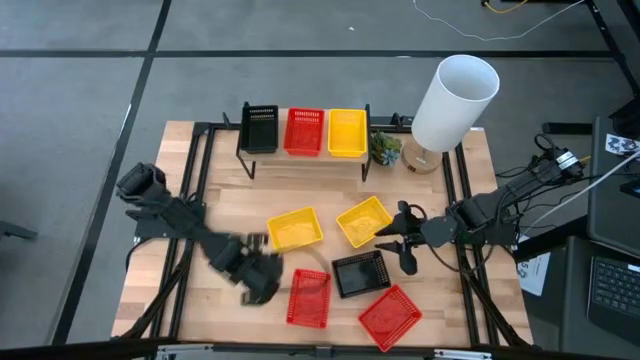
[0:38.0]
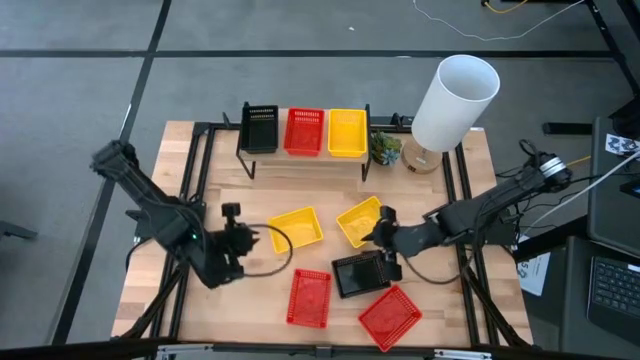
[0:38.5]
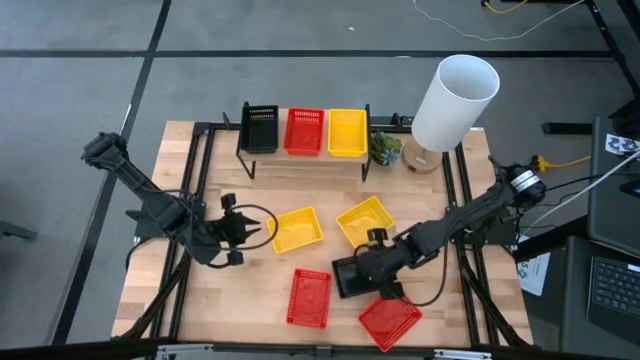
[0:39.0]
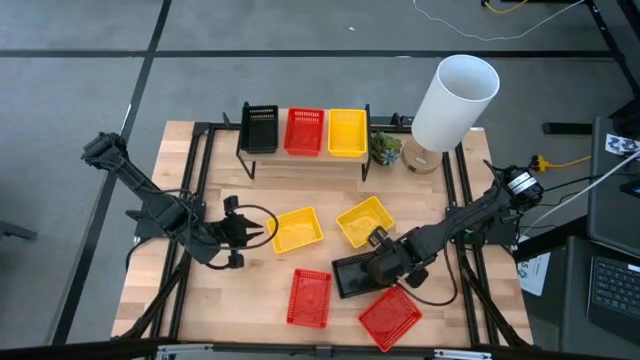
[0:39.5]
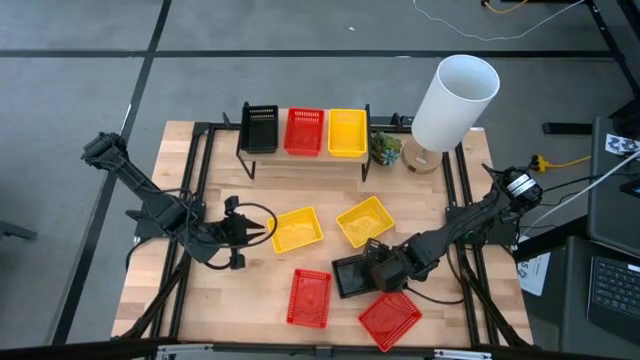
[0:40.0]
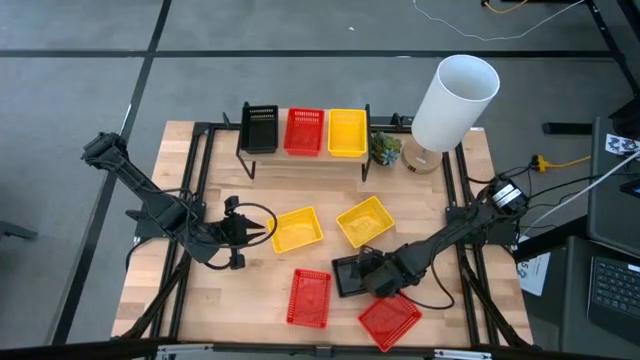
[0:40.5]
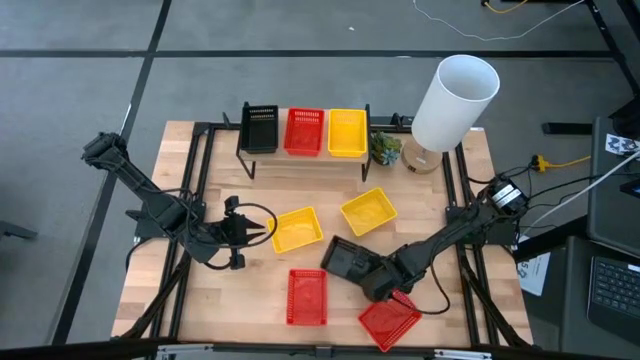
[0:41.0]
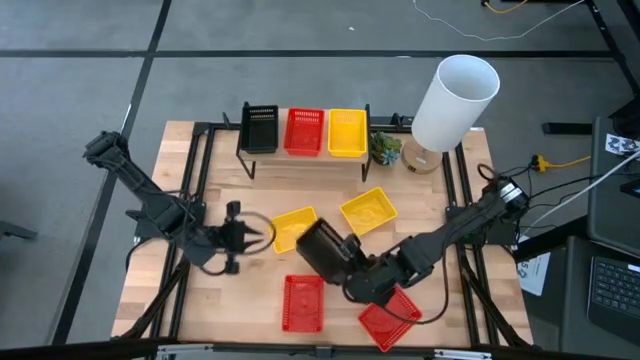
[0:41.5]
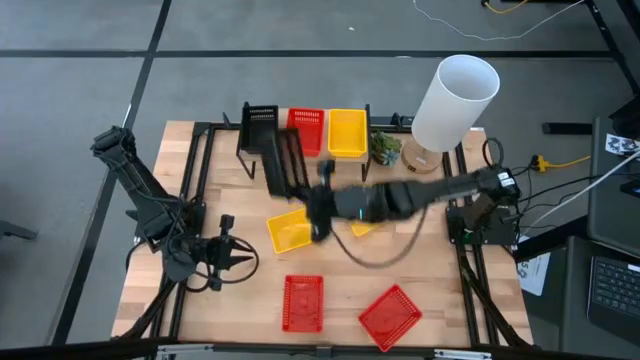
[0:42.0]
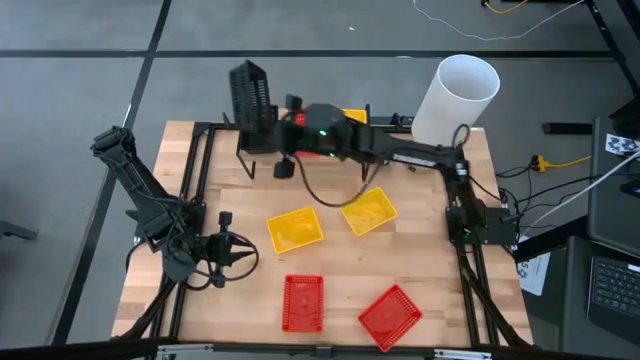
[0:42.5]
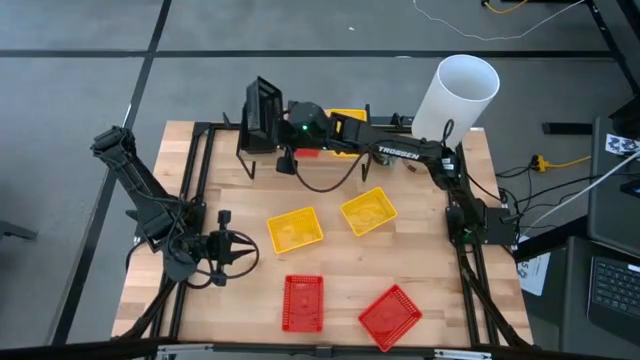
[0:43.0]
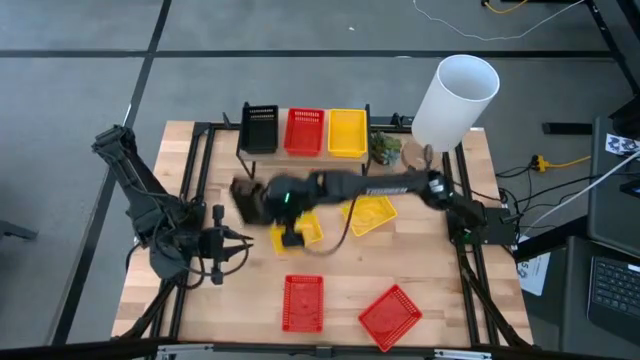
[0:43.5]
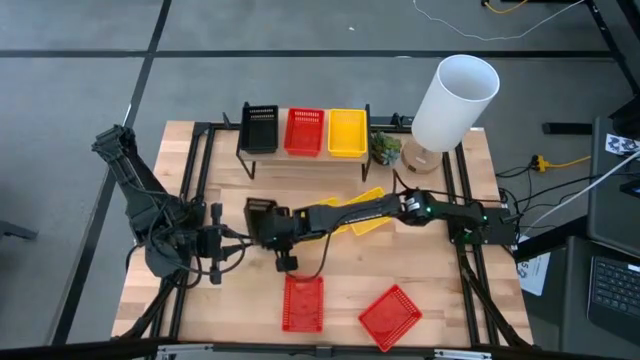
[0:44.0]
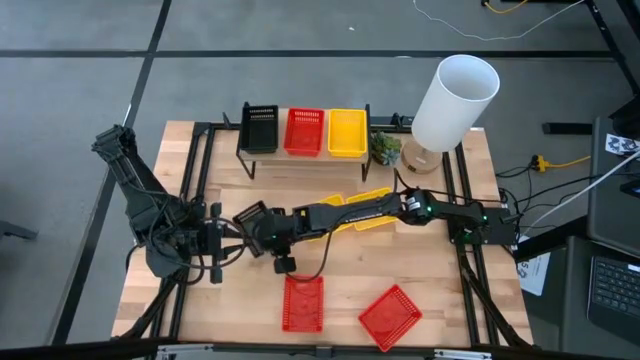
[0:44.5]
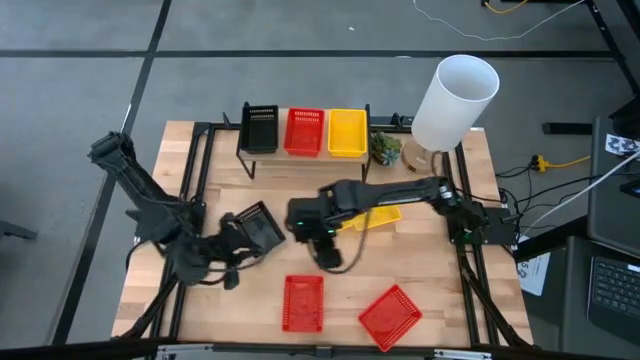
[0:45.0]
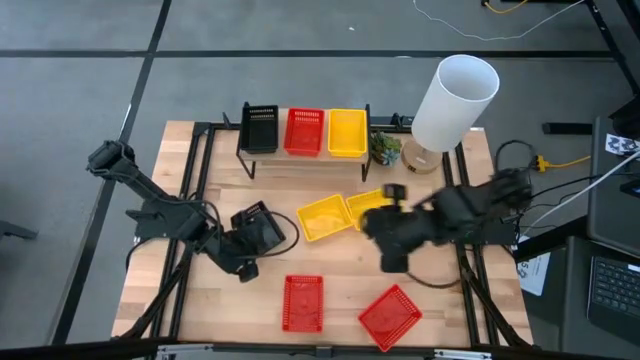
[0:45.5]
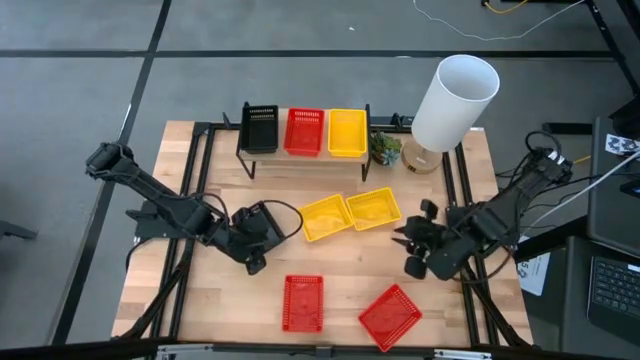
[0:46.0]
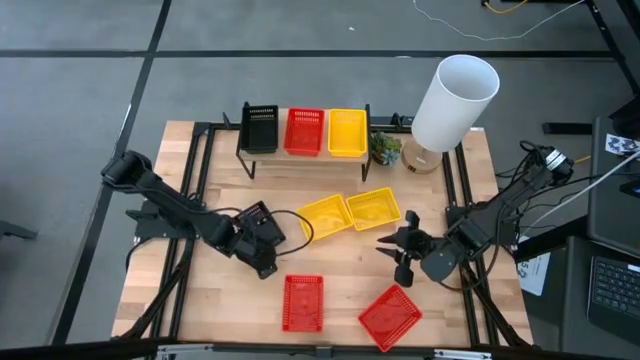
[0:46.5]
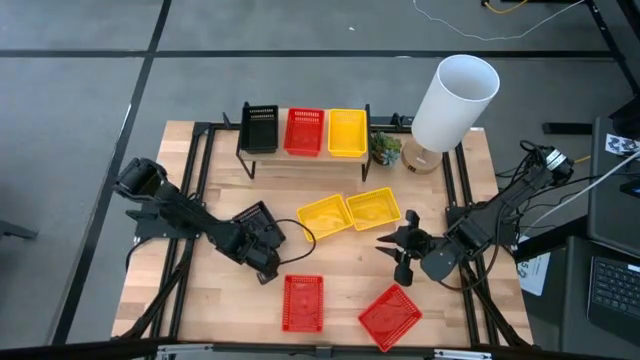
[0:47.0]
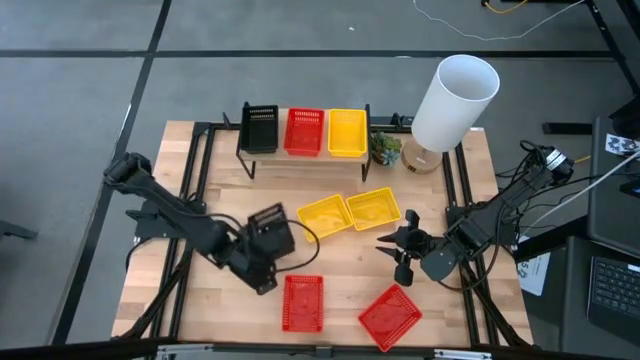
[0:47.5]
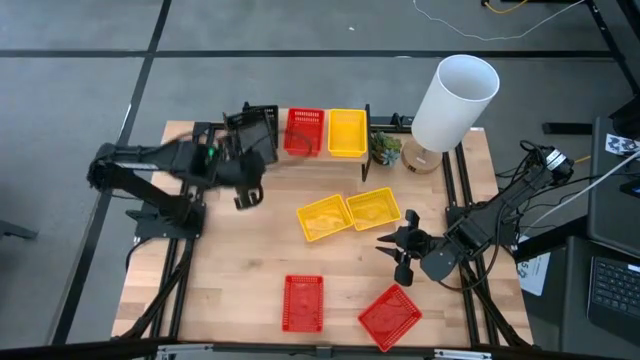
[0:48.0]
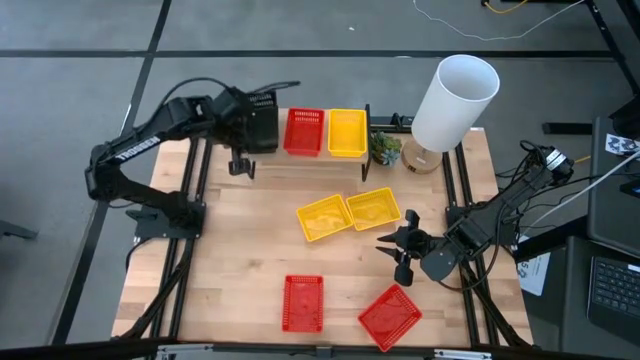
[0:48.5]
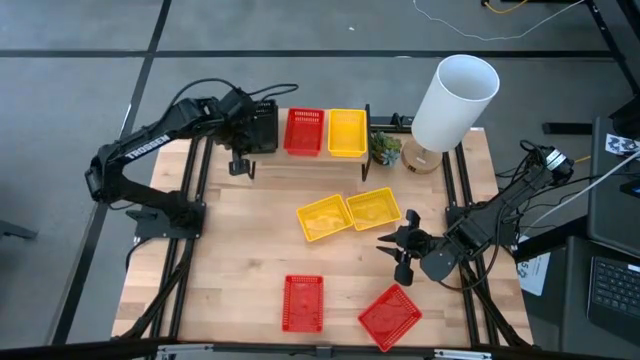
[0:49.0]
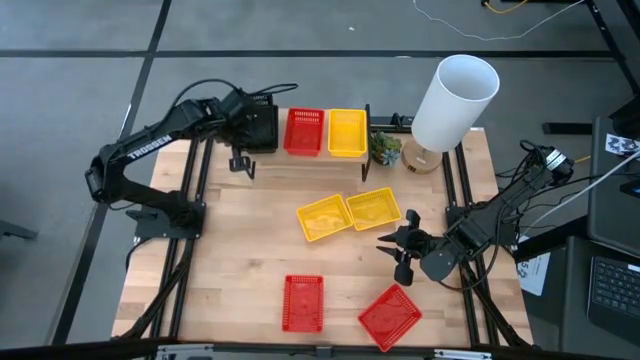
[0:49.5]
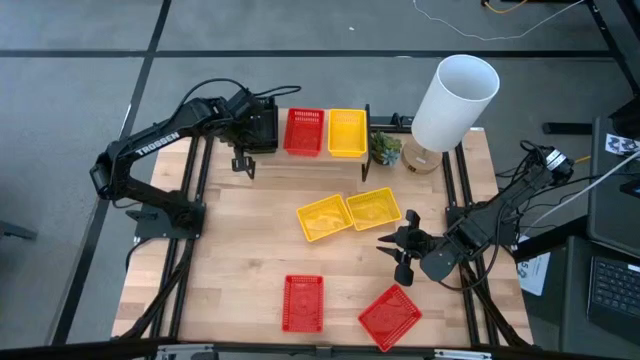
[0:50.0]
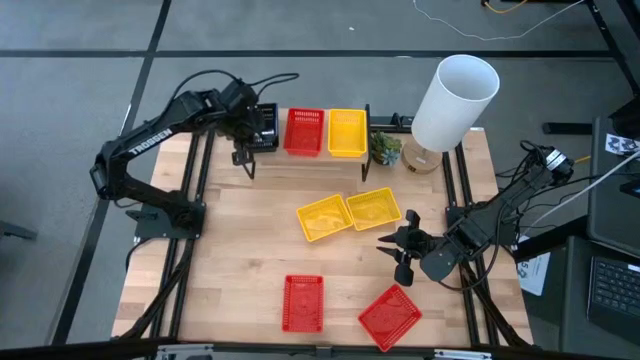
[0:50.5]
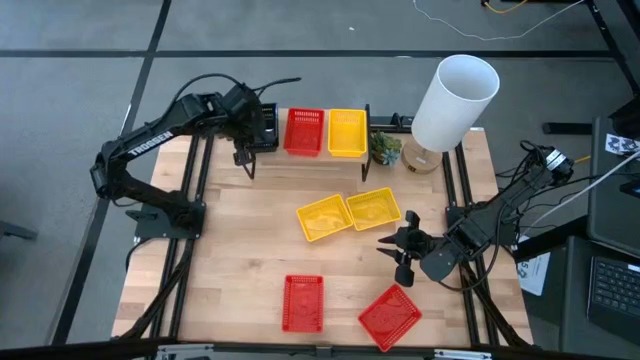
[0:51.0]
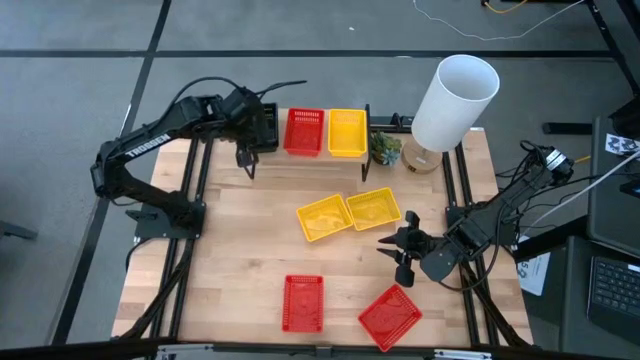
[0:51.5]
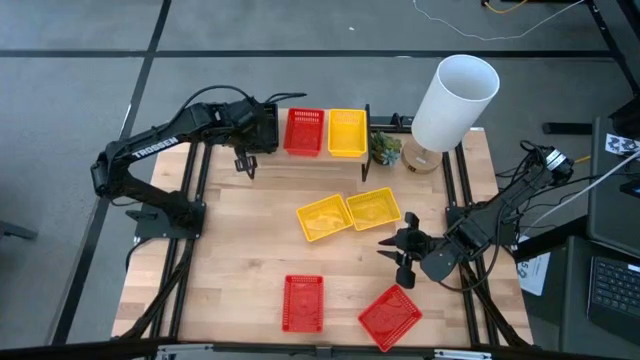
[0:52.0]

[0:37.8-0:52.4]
Task: Stack baskets on shelf by color
Stack the black bin on the other black bin on the shelf

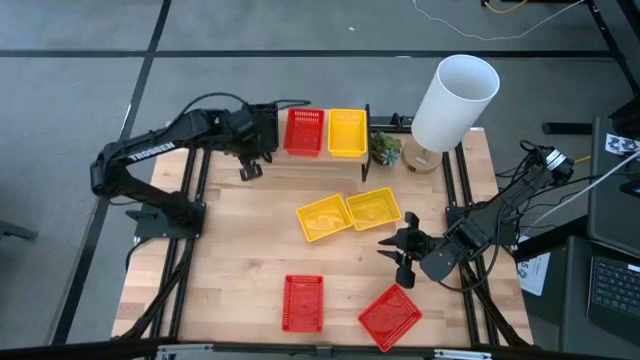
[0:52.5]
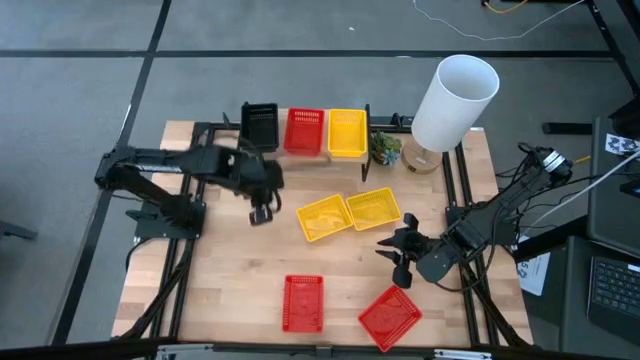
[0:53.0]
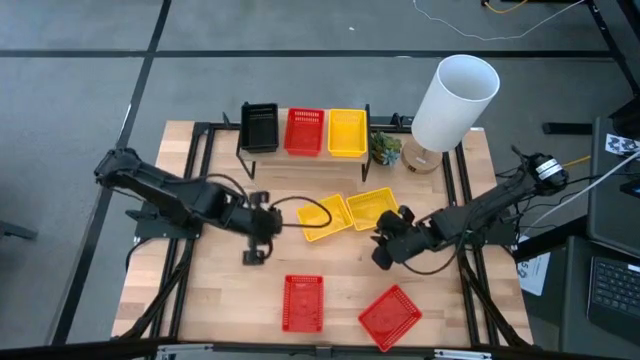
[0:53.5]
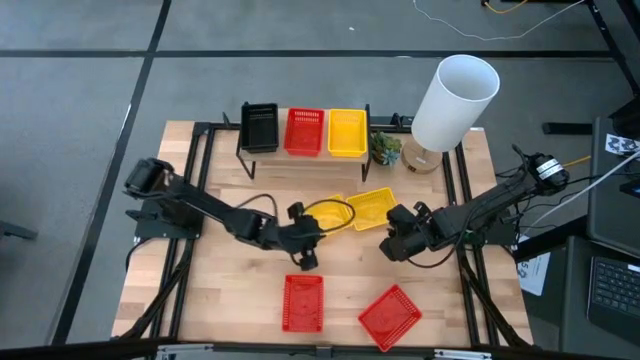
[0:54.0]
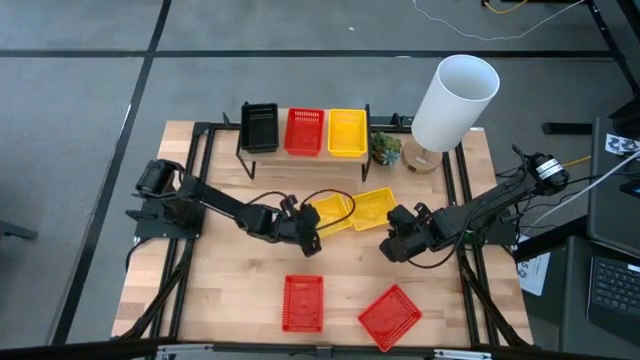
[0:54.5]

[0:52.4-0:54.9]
Move the left yellow bin to the center of the table

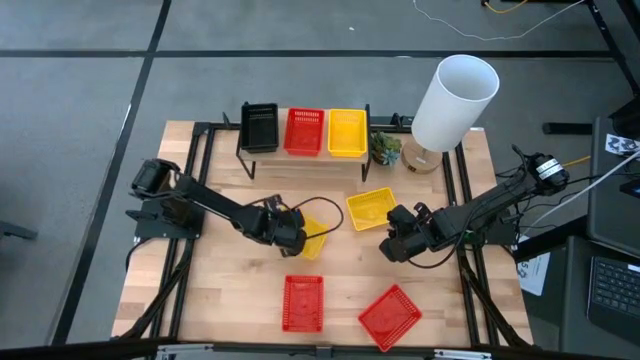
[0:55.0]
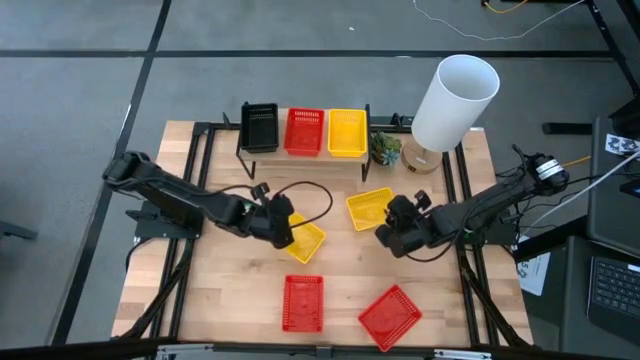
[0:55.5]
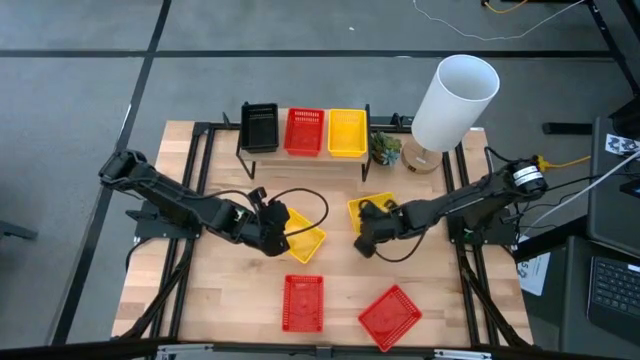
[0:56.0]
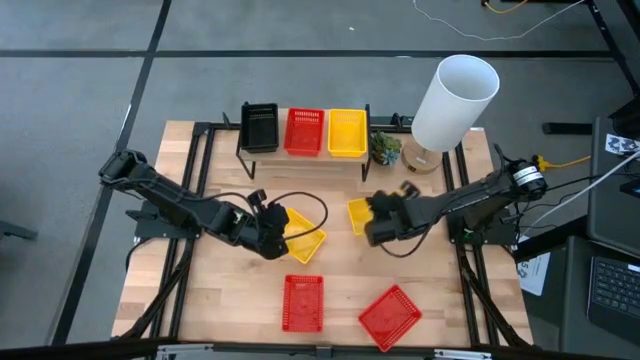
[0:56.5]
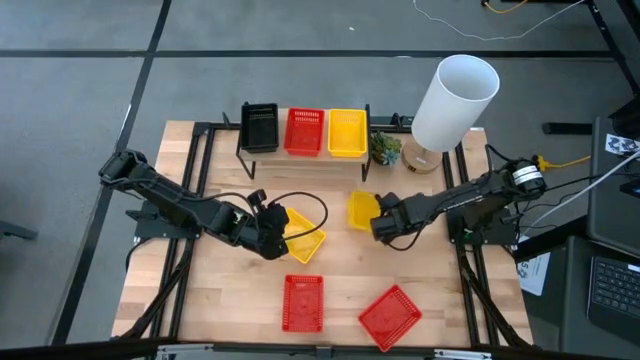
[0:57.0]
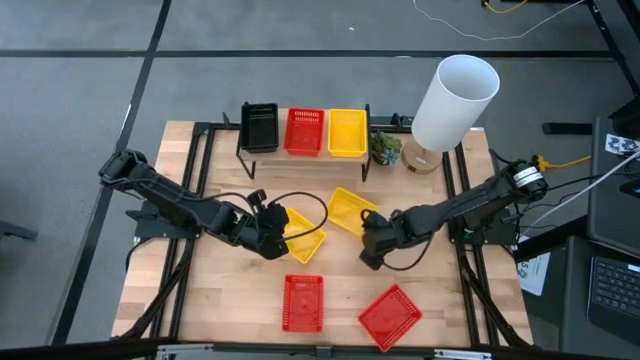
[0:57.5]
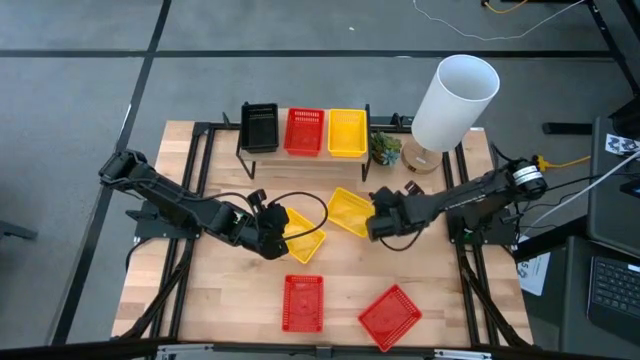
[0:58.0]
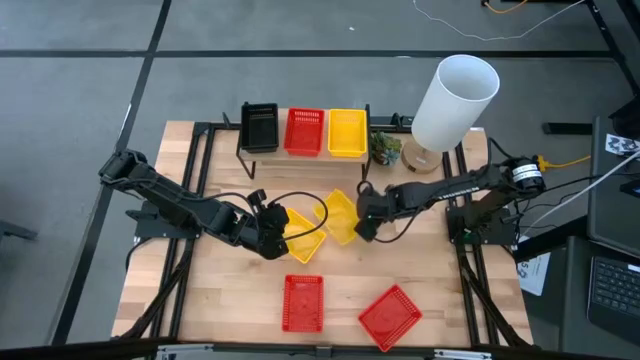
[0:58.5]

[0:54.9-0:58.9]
Stack the right yellow bin on the other yellow bin on the shelf
